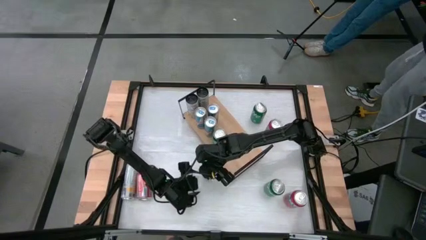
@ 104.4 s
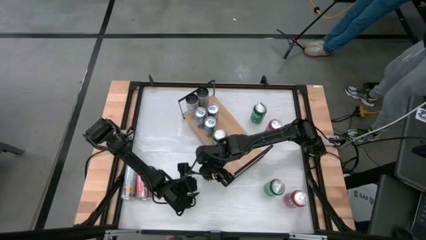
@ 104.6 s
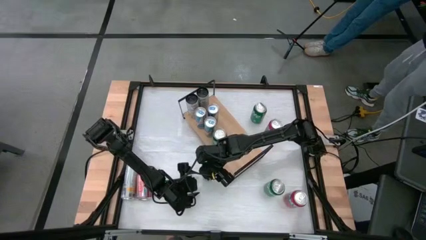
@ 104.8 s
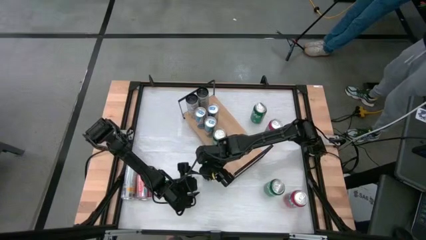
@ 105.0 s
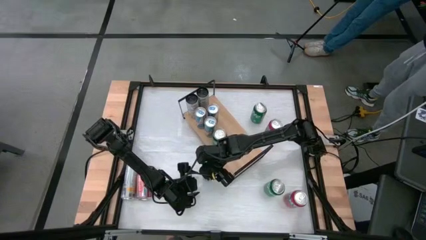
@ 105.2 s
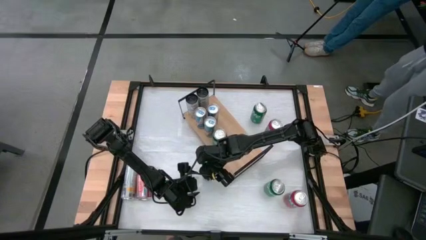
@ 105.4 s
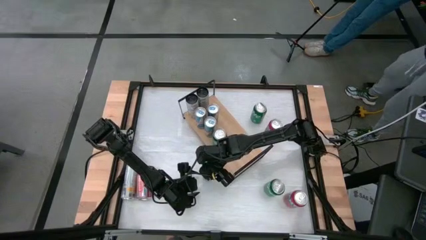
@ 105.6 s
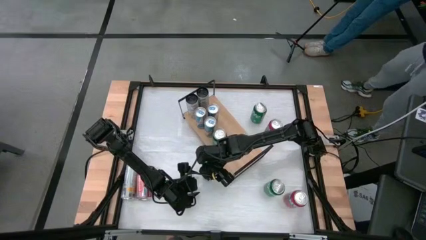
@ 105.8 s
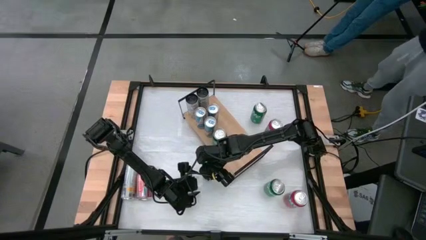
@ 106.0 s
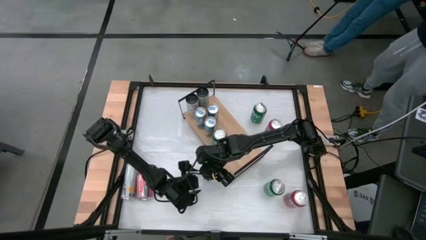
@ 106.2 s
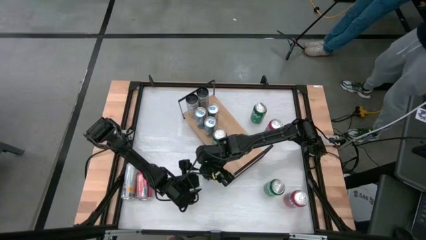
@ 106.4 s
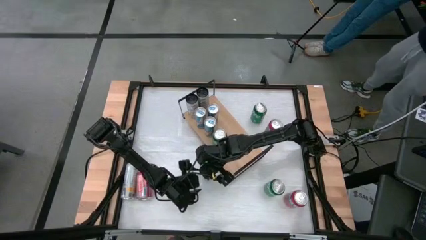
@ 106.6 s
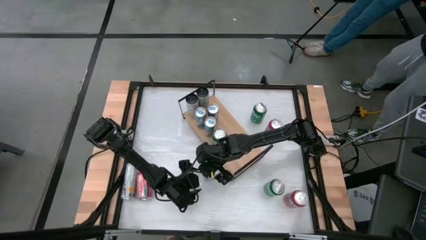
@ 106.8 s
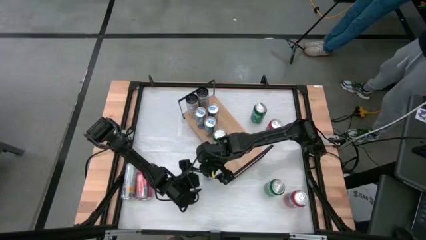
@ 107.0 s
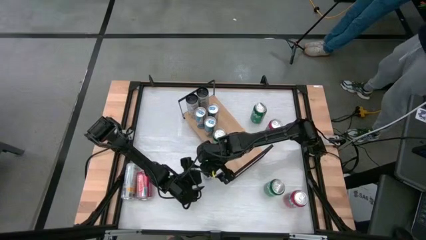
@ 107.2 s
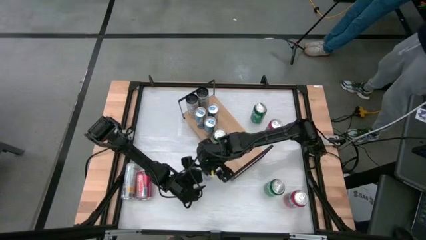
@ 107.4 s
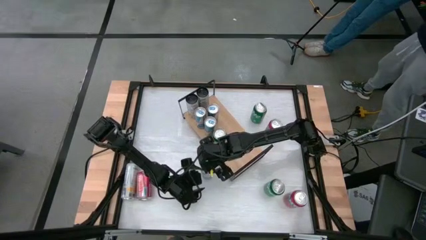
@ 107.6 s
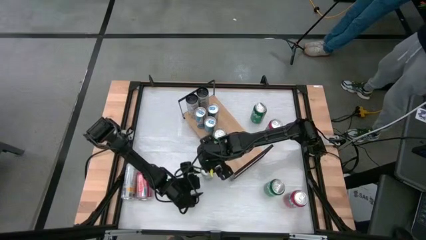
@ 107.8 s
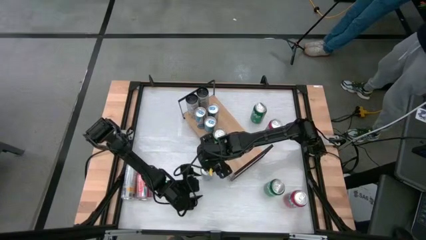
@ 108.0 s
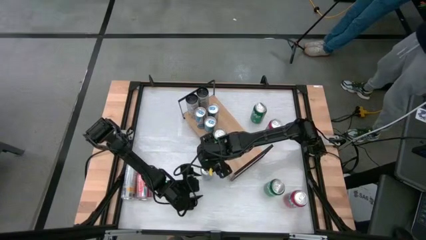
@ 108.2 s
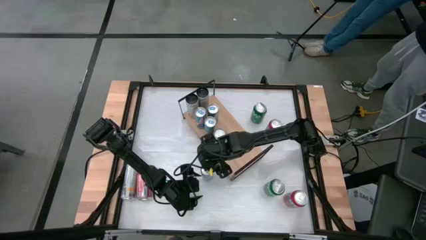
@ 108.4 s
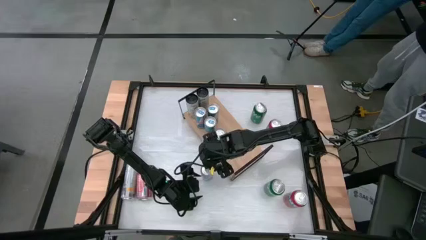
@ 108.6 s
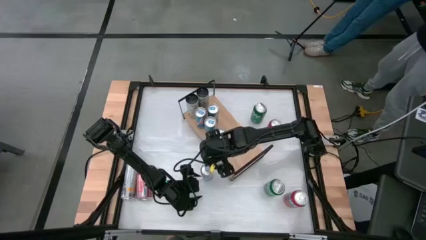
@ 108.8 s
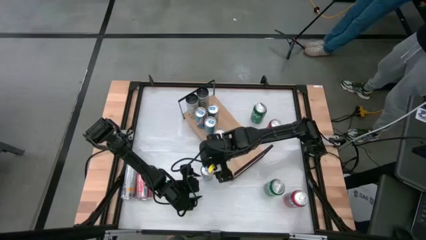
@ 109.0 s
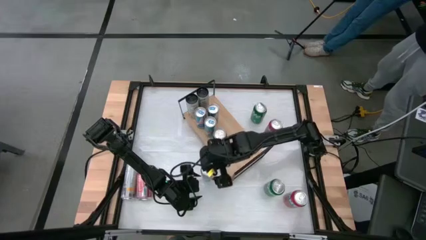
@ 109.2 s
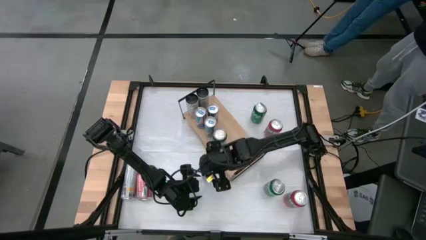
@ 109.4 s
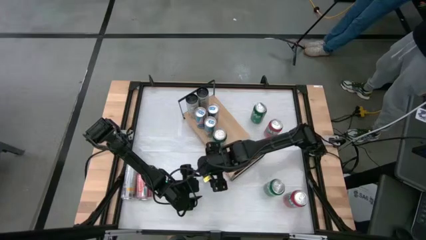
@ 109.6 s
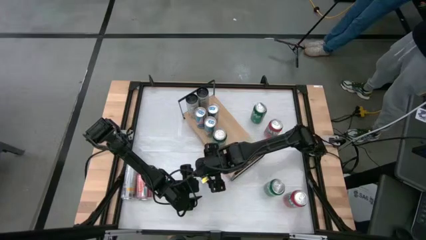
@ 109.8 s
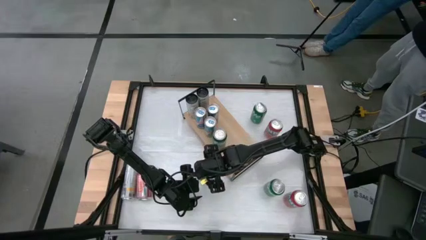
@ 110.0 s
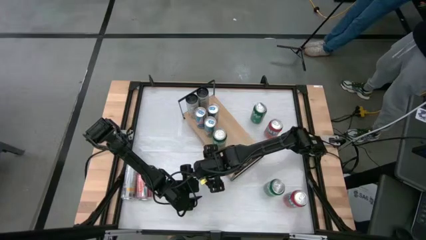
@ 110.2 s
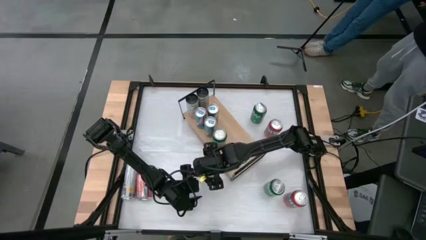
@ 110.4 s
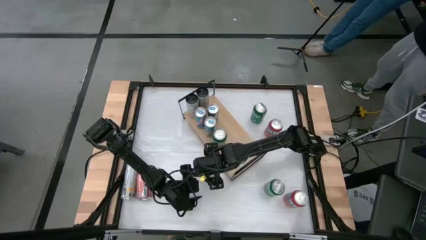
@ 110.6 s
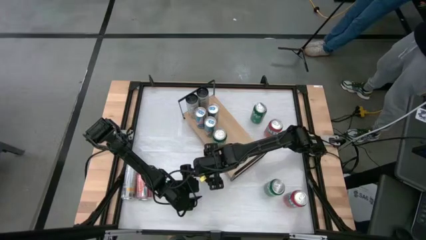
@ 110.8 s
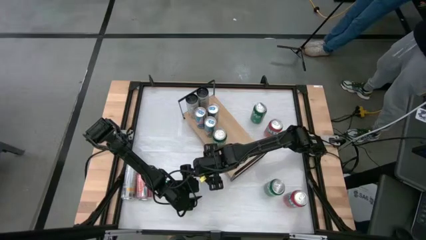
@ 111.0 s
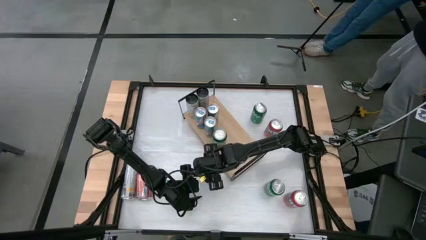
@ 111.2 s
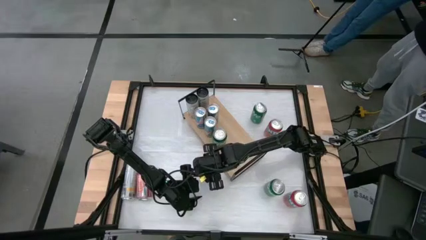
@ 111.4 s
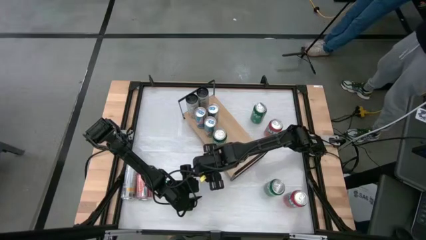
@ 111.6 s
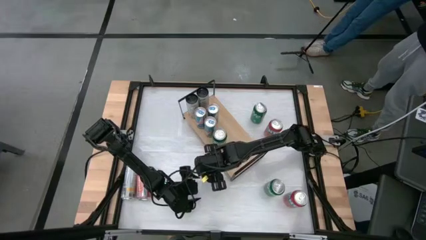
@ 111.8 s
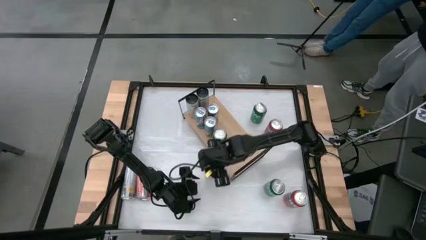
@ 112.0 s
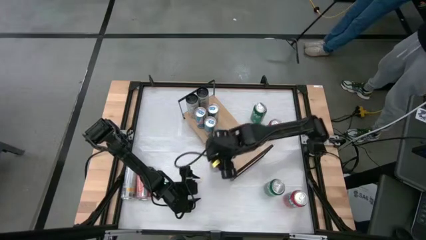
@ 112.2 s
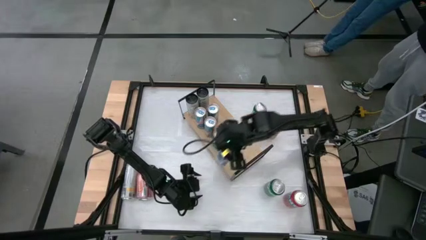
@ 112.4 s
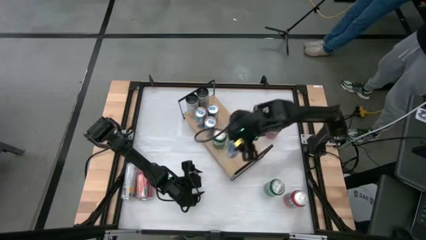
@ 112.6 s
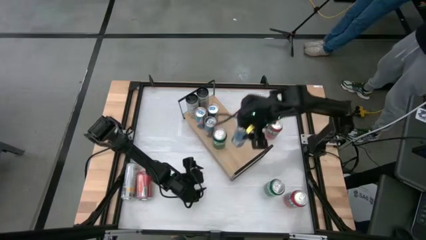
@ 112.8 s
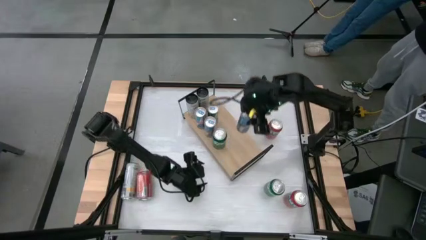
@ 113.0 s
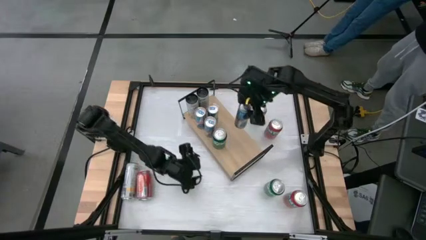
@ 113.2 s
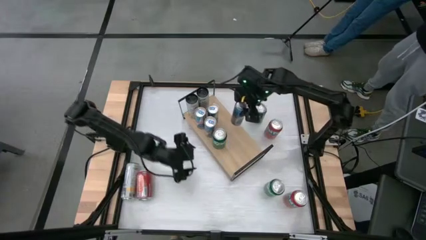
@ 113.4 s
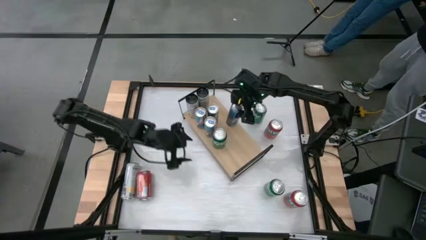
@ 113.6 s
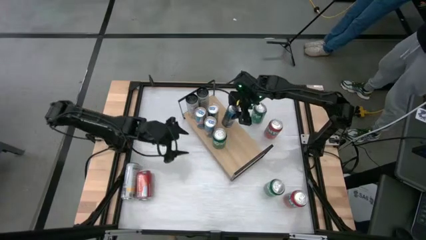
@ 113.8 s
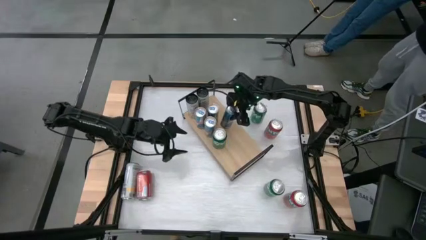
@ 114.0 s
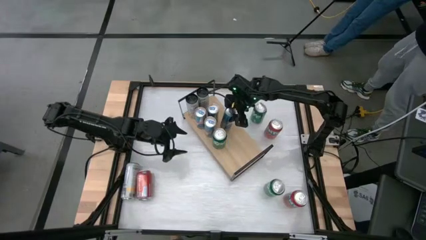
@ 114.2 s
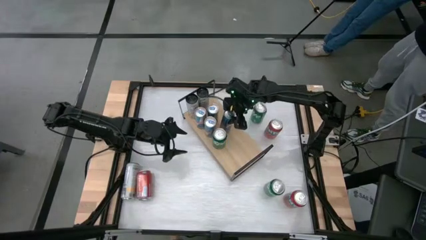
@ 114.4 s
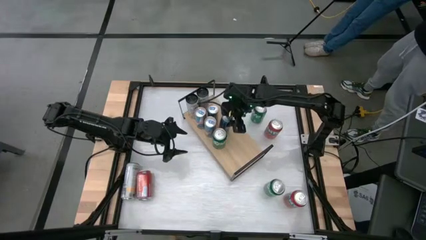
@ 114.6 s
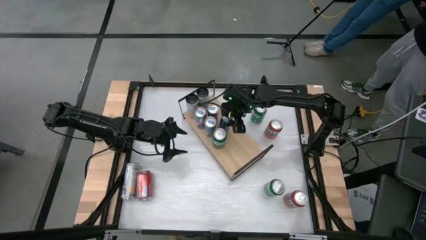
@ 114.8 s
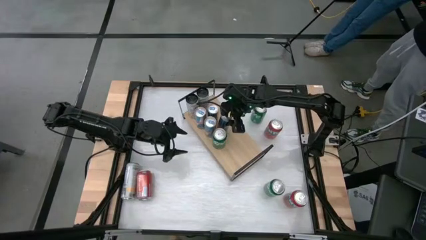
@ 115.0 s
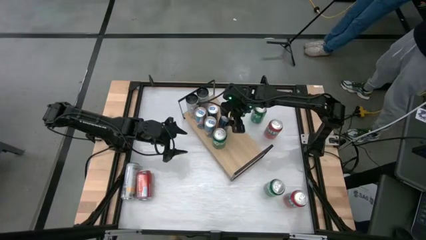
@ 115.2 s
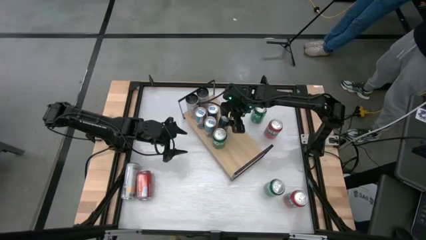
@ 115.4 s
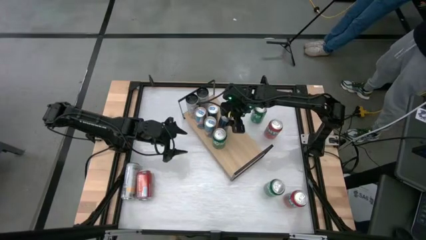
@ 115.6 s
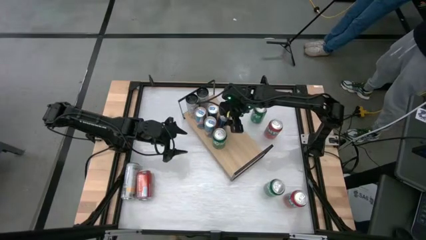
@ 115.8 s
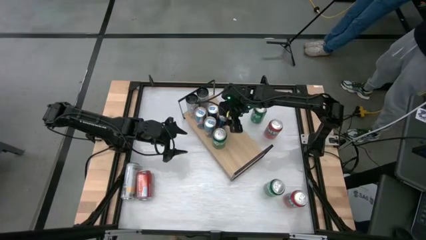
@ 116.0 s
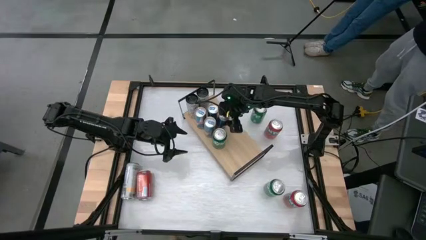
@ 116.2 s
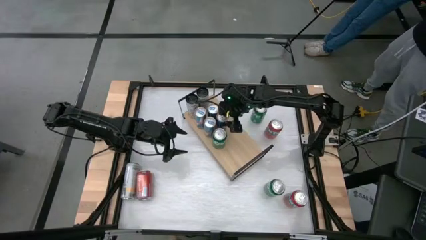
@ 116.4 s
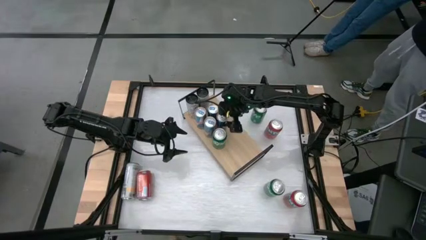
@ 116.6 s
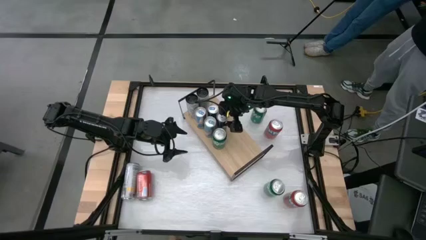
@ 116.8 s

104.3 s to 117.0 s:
Task: Place canned beverage on shelf
Put the blue soda can on the shelf aligned with the other blue soda

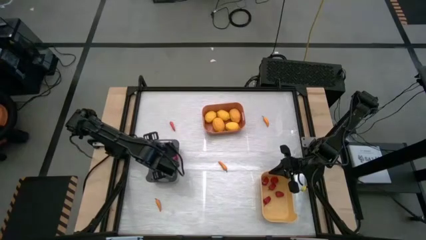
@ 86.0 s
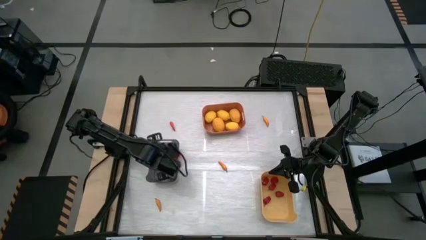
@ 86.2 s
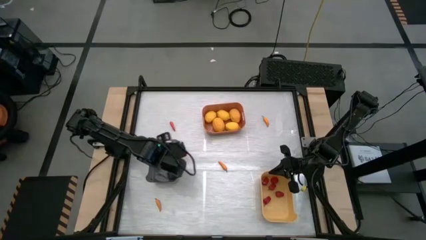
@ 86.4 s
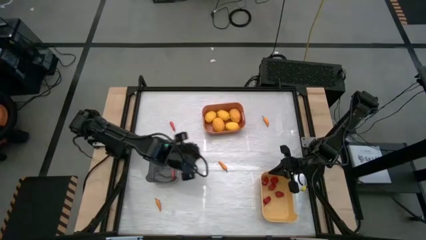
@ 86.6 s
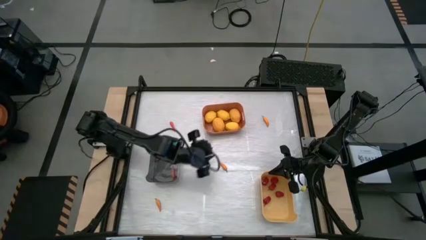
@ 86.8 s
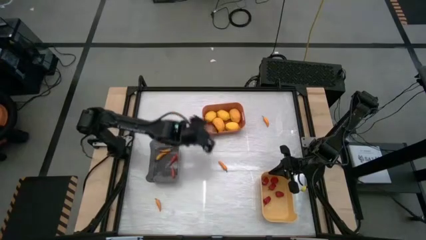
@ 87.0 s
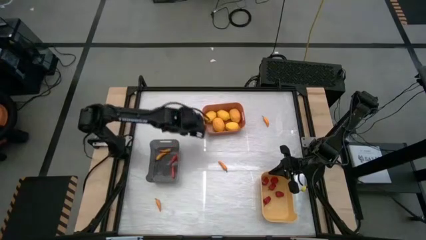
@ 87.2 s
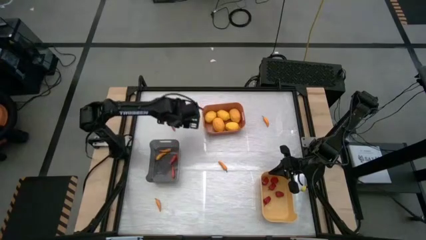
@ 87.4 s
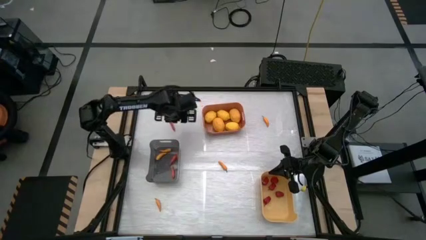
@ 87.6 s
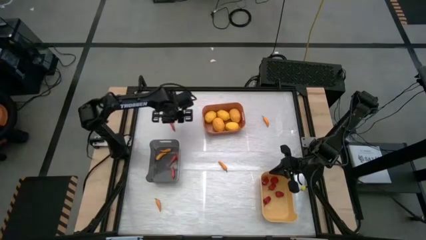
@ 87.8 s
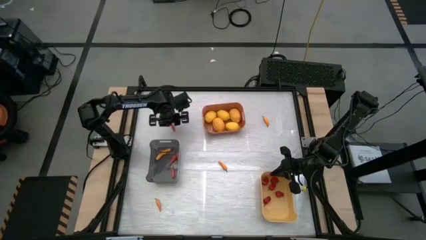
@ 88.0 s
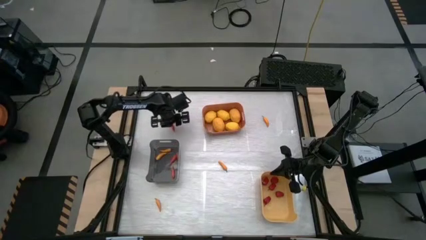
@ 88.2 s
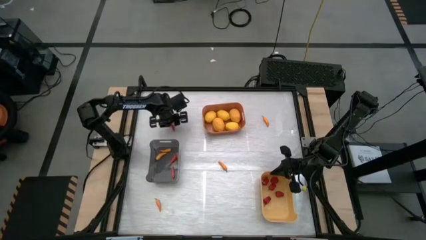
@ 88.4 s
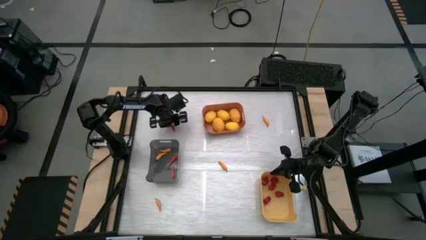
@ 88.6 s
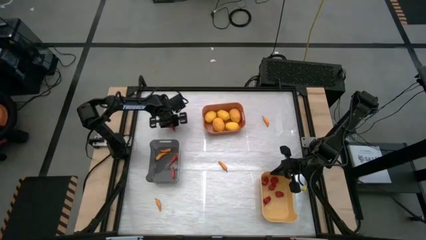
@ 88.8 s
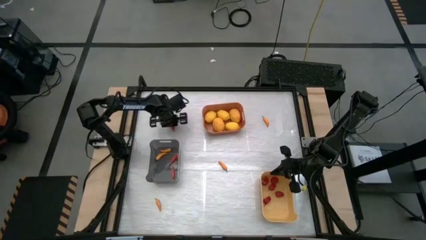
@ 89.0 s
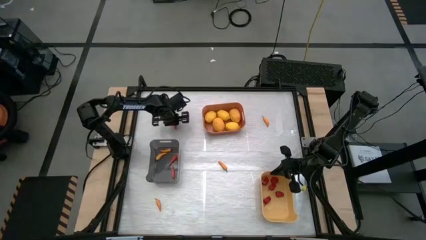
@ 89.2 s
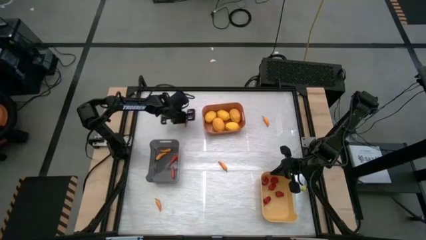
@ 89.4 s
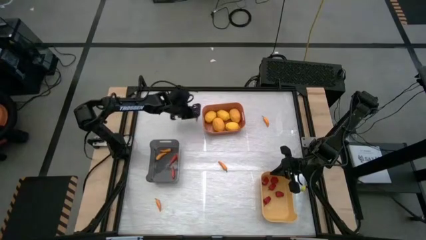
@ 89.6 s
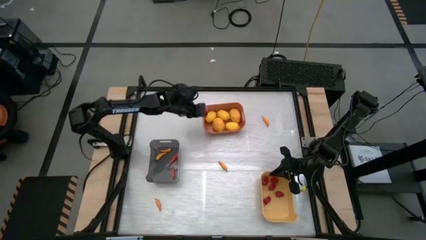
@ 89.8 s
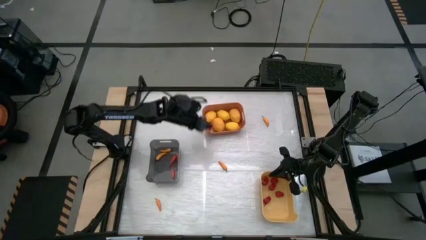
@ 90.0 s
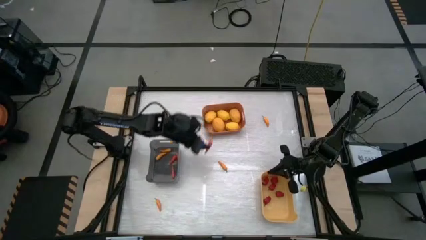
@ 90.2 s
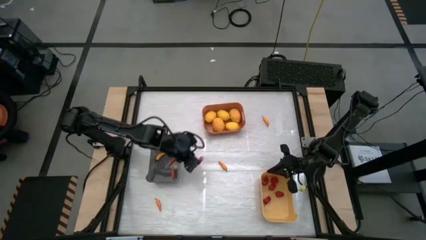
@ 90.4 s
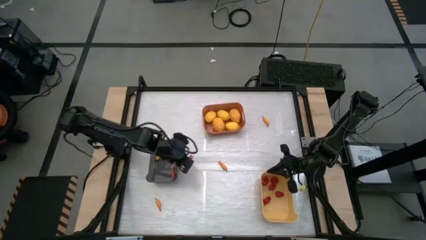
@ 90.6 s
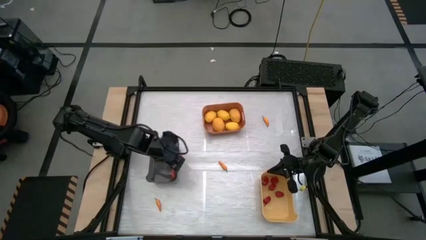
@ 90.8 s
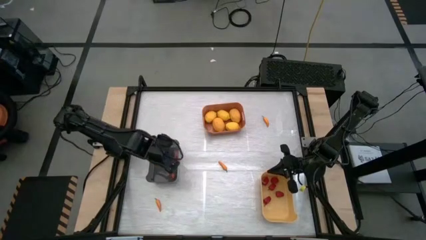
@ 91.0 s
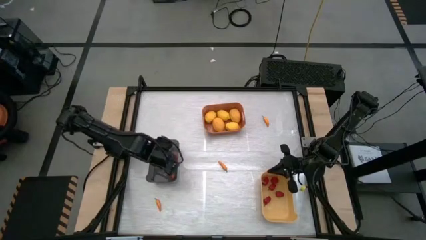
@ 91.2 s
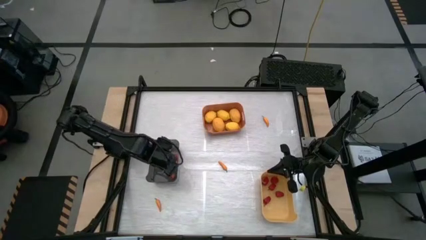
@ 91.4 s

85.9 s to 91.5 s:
Task: Sort produce into baskets
Put the orange chili pepper into the black bin
